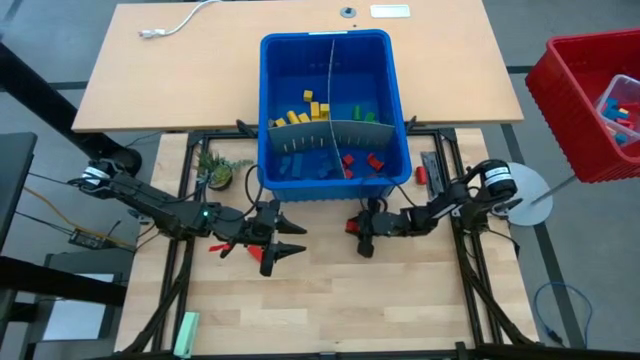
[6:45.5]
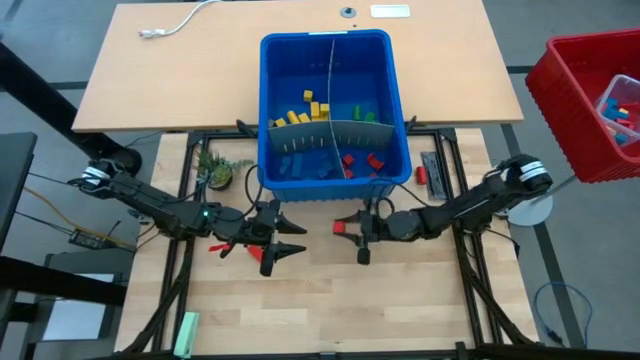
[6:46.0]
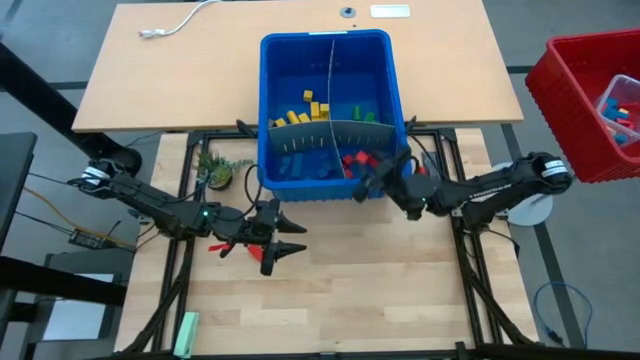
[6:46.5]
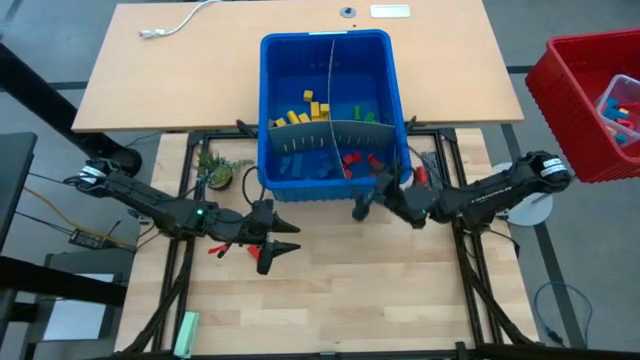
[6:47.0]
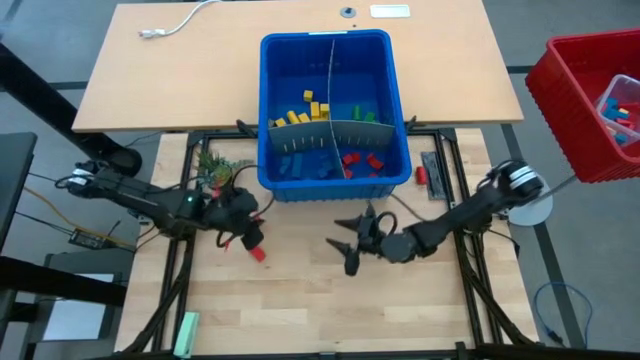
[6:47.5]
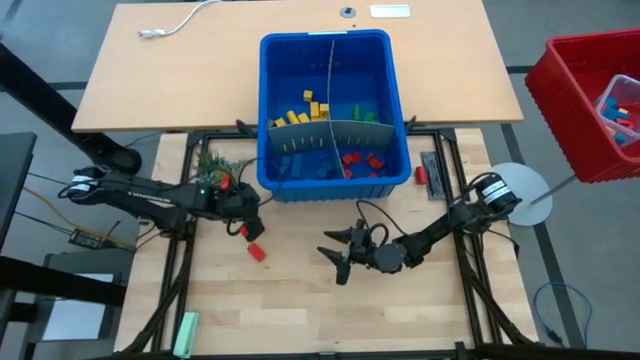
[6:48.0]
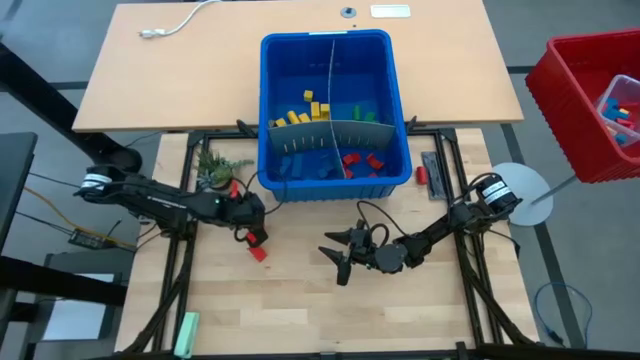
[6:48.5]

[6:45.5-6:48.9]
Task: Sort blocks
Put the orange block with the other orange blocks into the blue bin

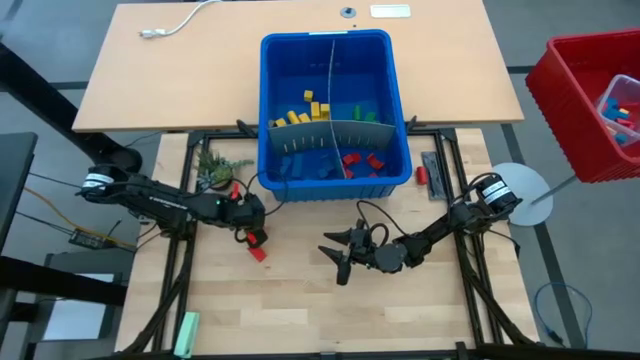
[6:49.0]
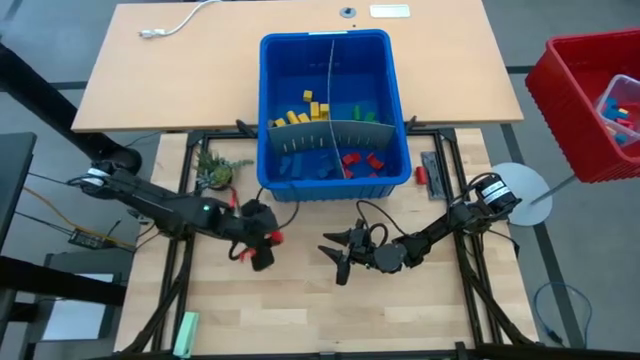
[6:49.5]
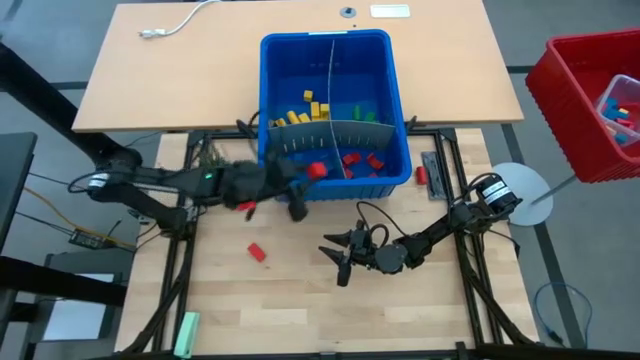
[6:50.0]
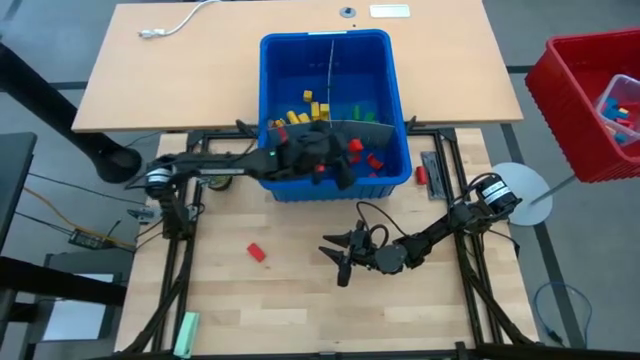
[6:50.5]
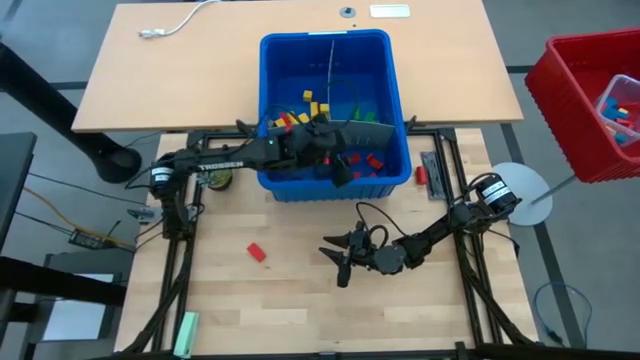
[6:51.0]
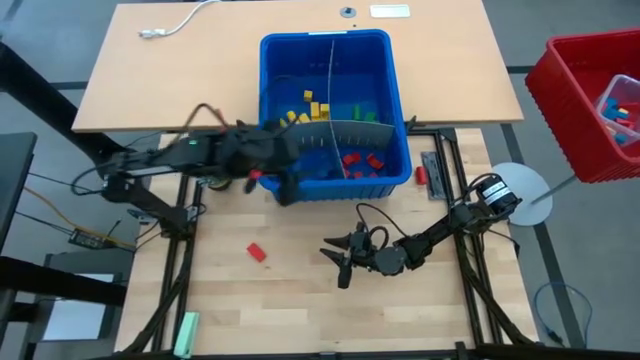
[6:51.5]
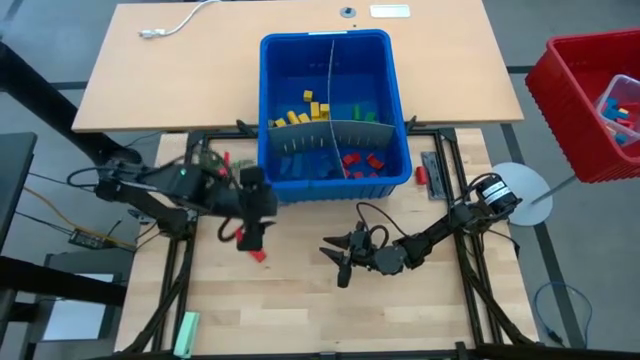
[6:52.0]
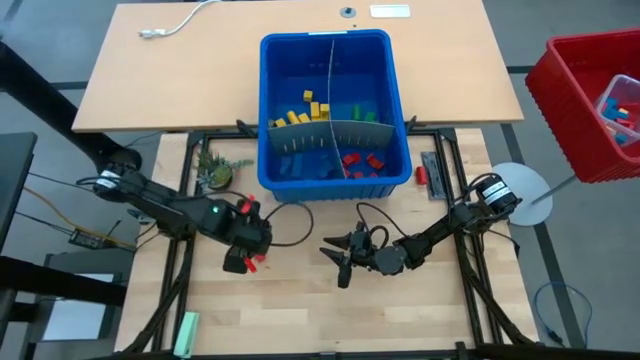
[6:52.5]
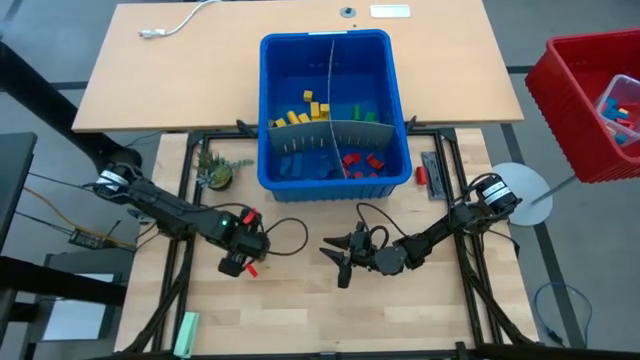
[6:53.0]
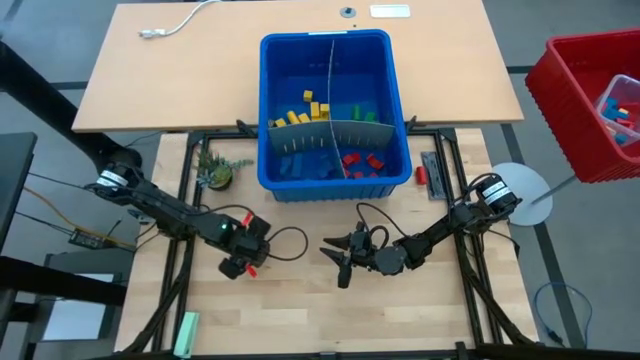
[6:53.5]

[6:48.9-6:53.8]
Put the orange block with the other orange blocks into the blue bin

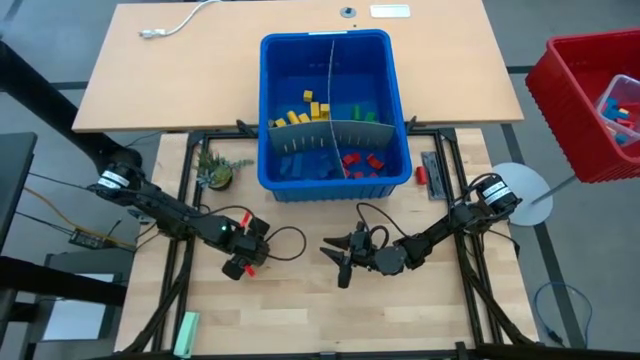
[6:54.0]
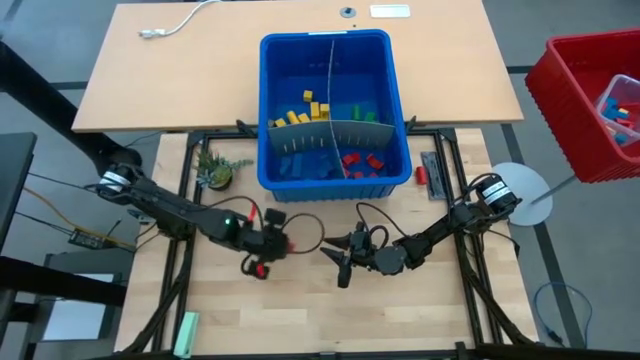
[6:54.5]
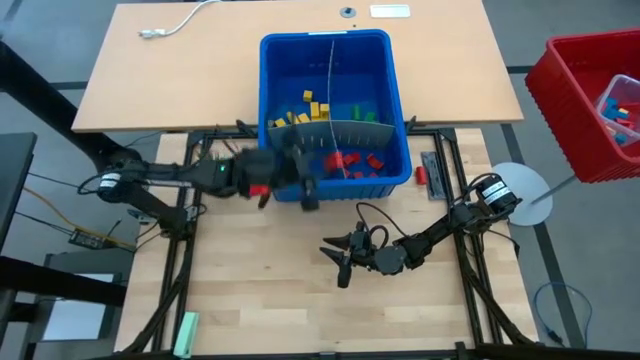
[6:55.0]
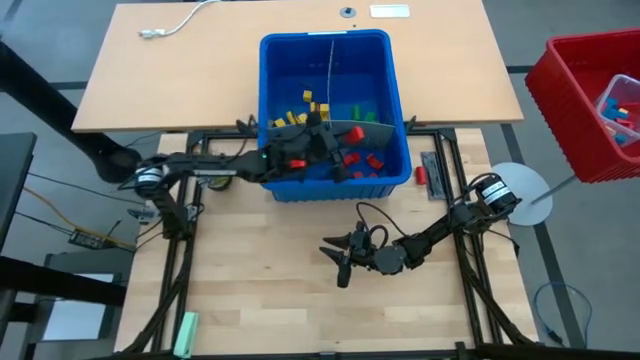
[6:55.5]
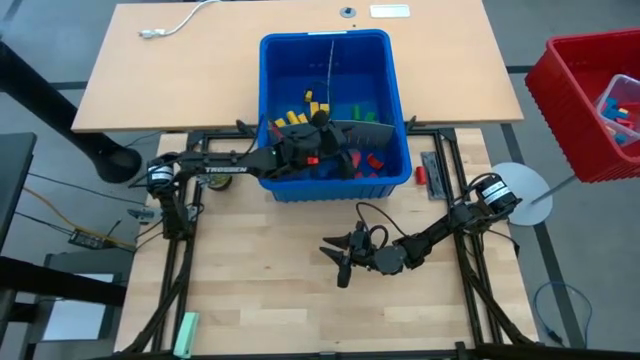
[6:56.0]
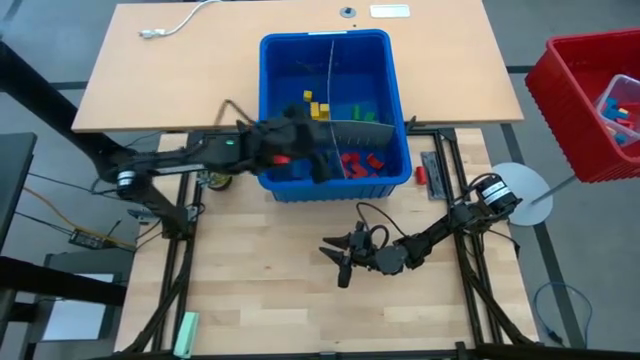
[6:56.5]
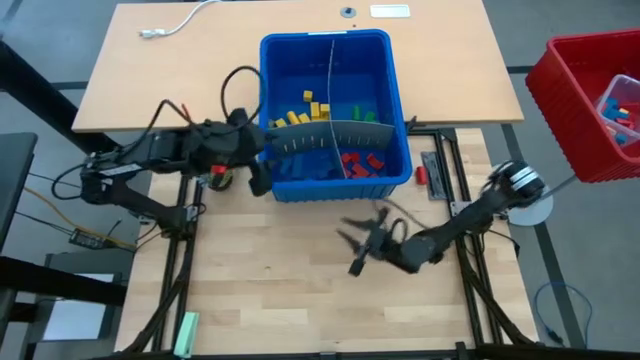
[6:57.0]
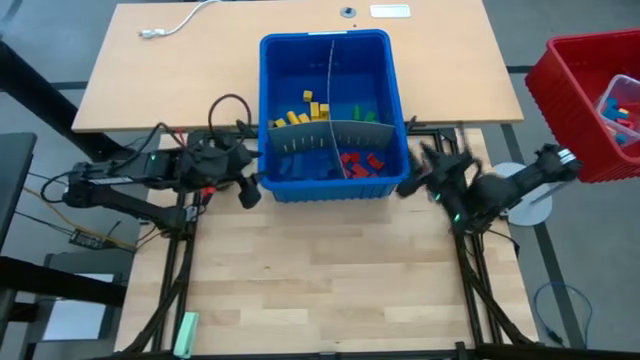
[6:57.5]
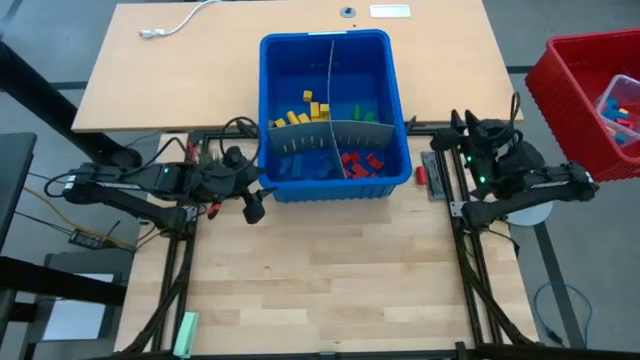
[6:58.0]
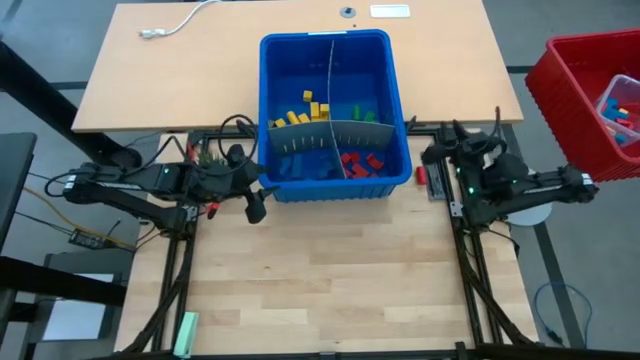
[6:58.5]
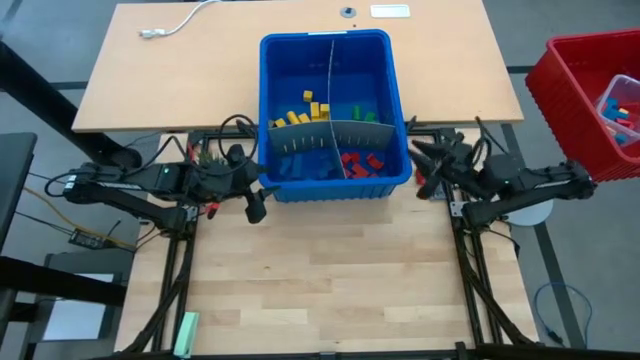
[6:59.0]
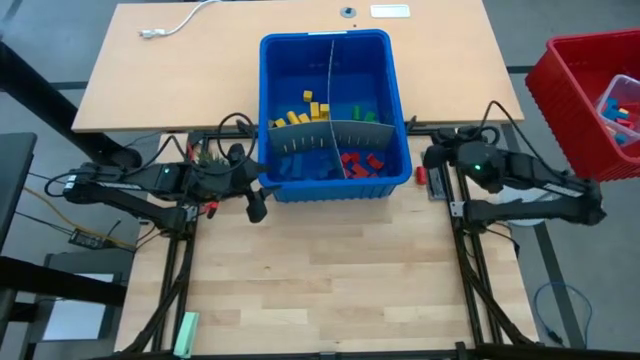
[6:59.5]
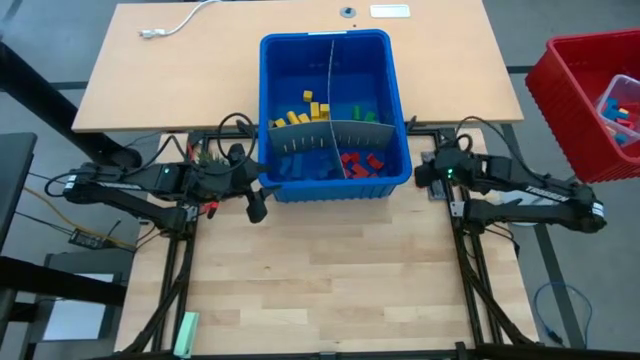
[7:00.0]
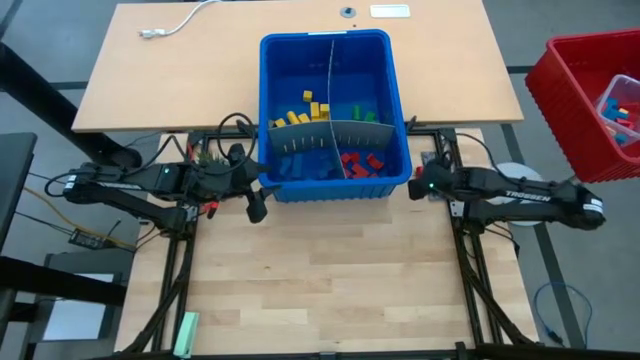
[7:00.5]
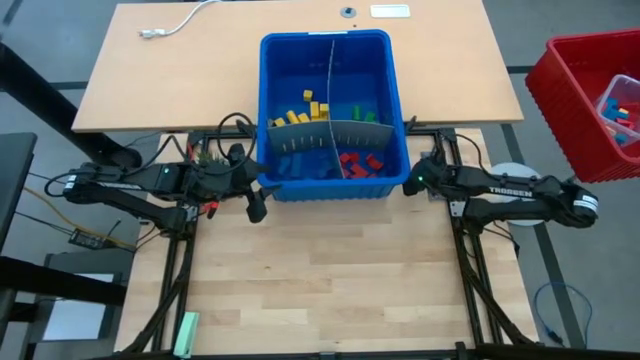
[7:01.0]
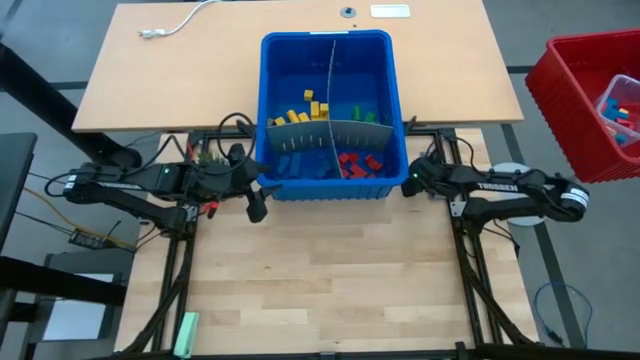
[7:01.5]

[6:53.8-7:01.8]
Put the orange block with the other orange blocks into the blue bin

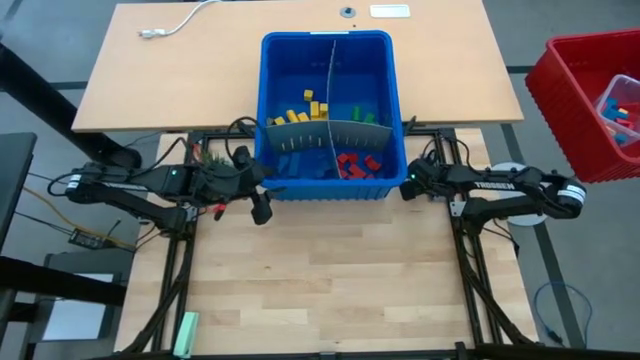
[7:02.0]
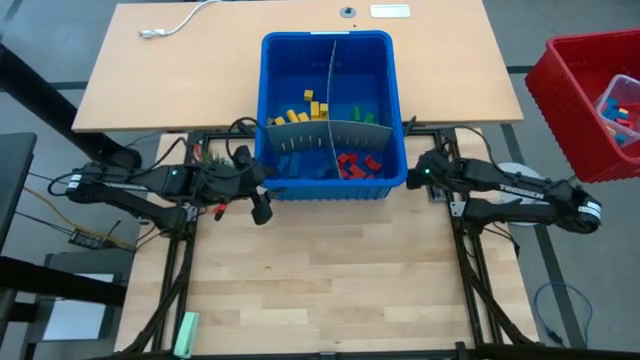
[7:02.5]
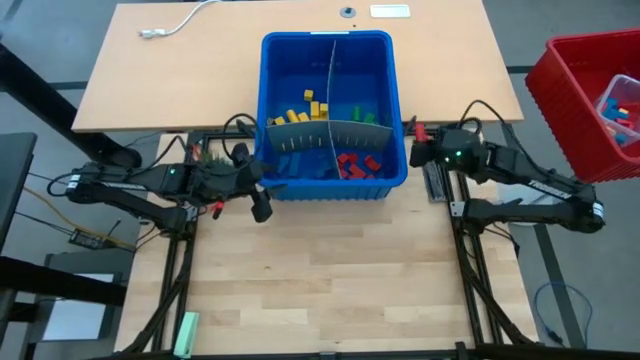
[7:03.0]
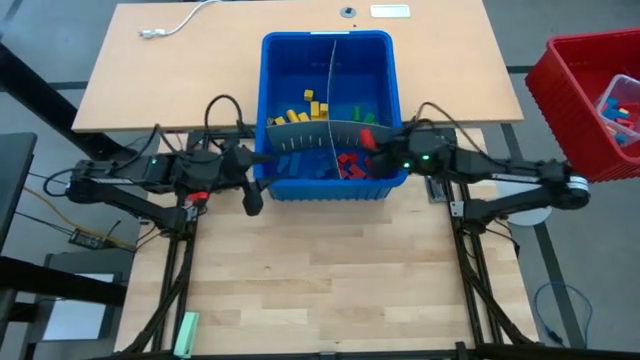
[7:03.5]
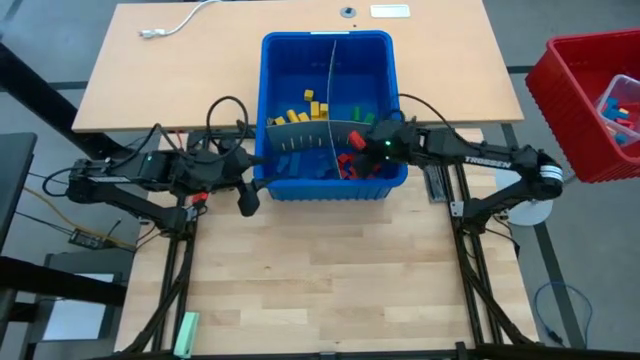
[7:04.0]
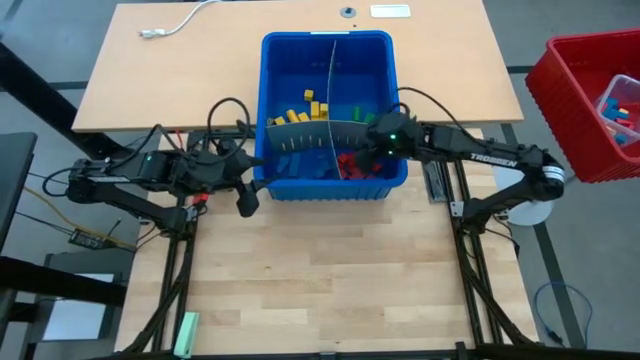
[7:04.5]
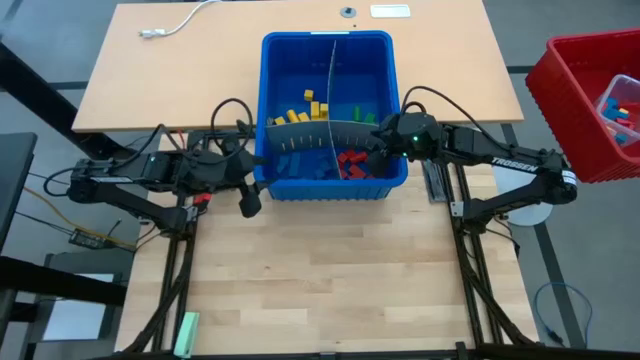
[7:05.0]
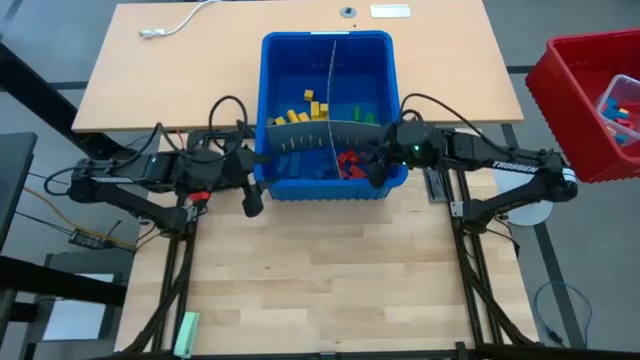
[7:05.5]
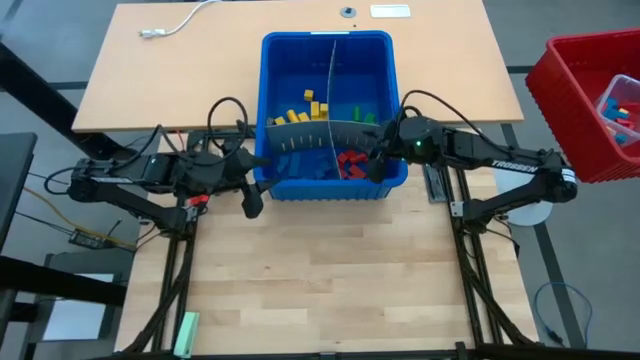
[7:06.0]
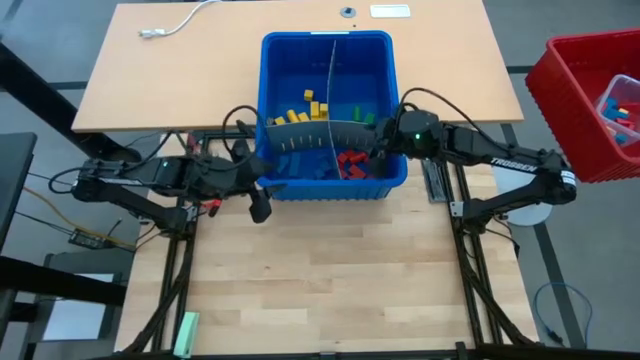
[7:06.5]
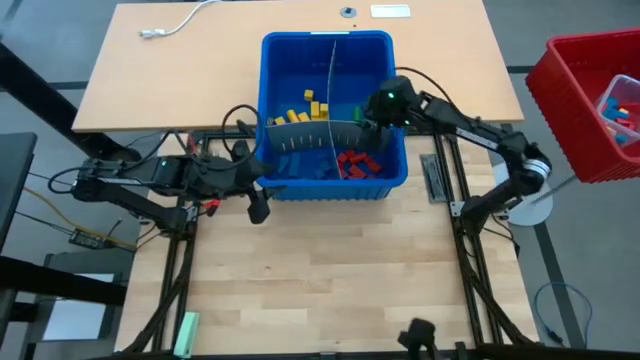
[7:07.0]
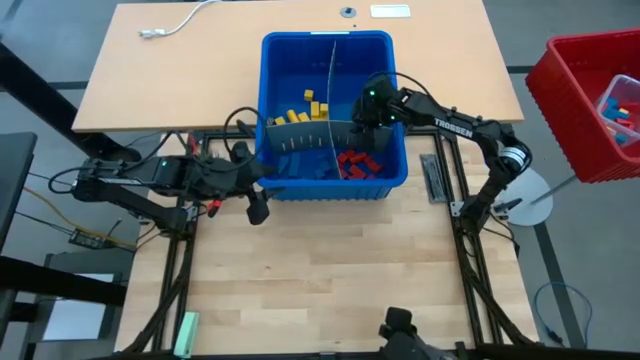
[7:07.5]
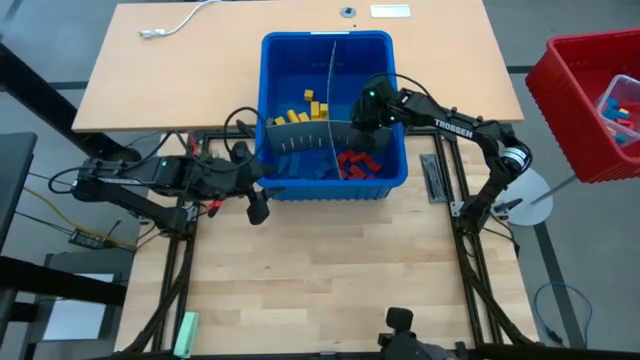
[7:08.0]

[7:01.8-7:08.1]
Put the orange block with the other orange blocks into the blue bin
